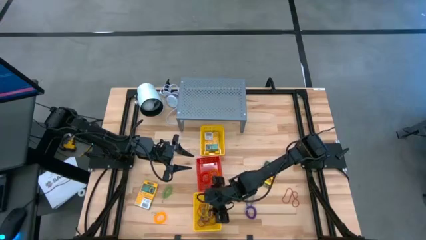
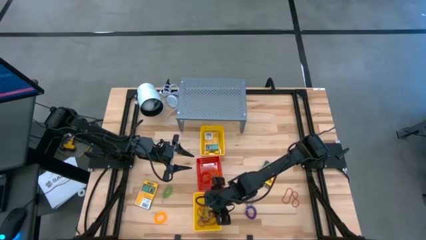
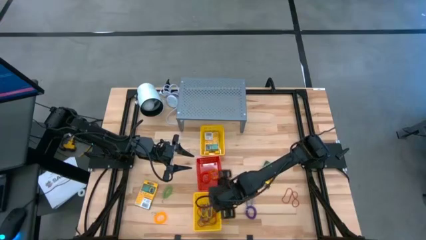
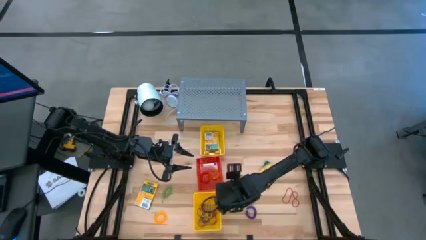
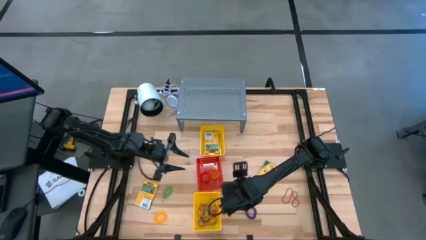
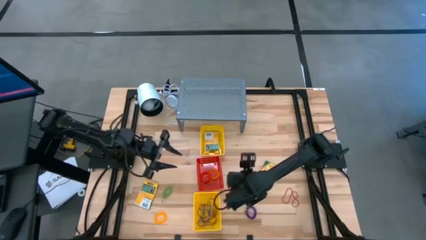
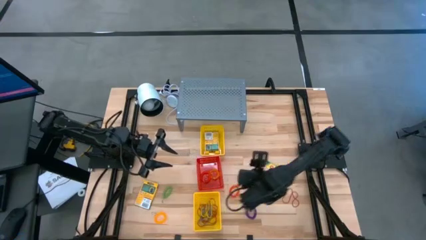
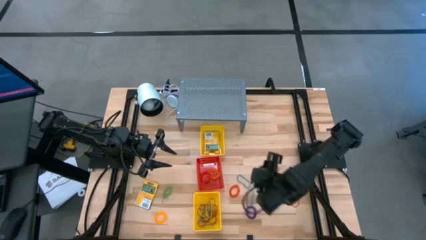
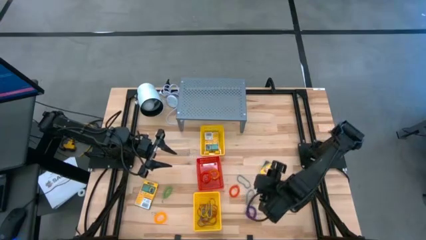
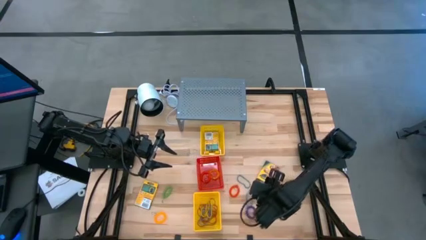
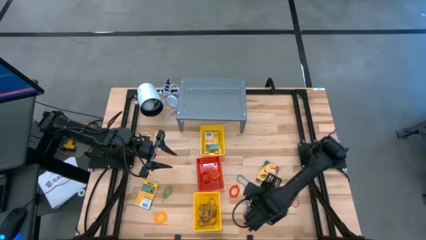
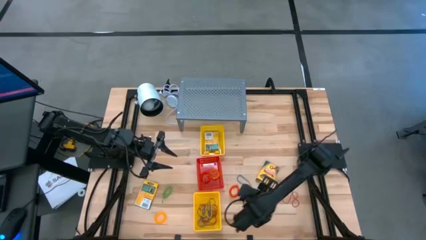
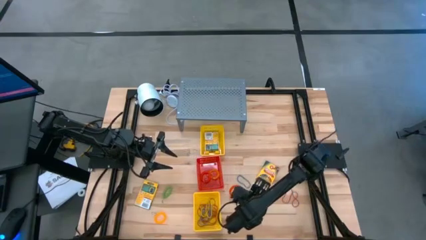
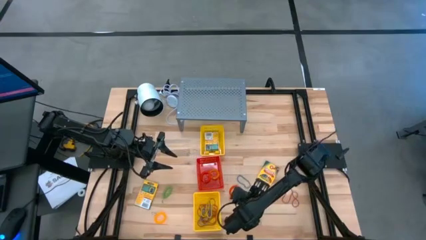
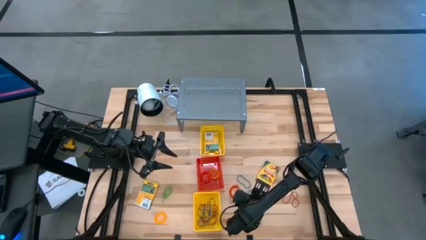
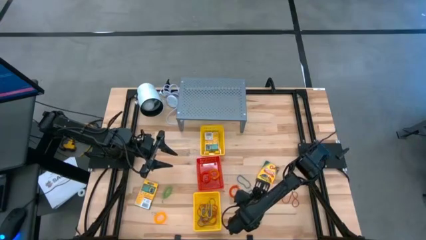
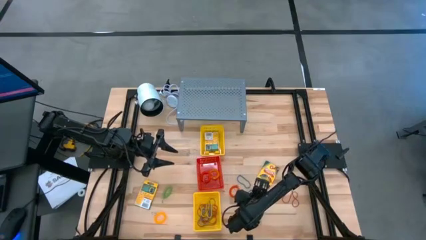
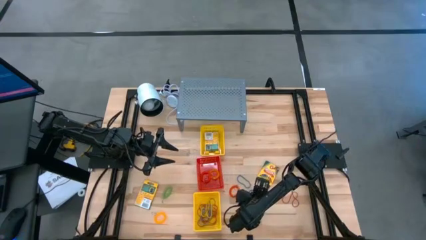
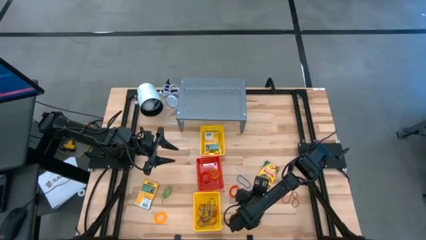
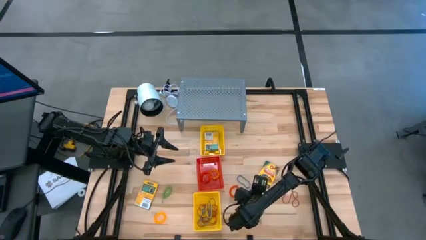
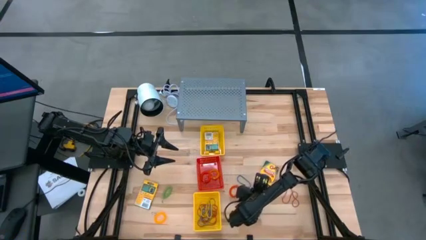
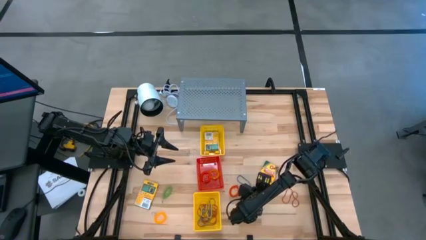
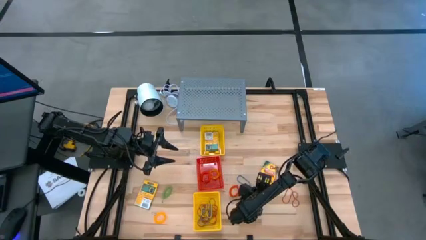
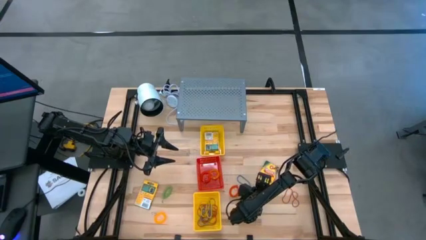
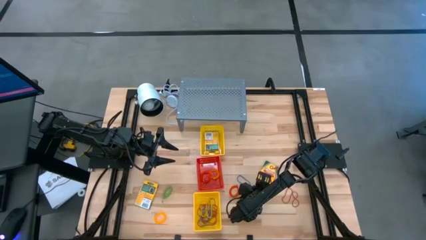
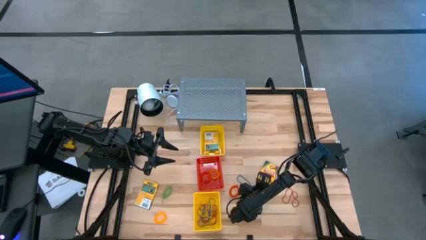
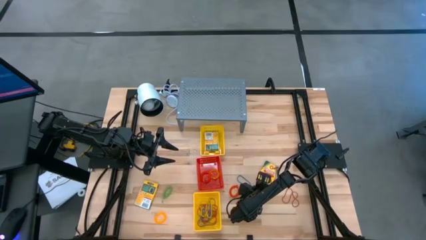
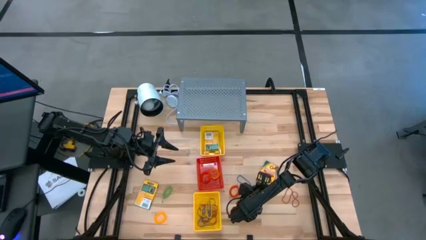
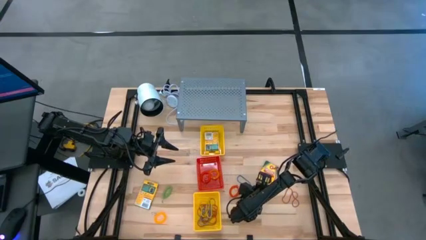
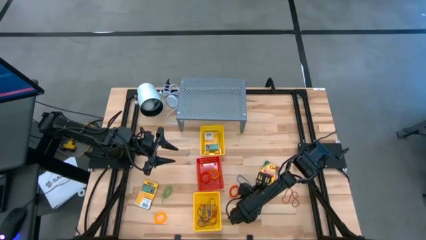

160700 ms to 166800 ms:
Task: Pick & Place Office Desk Supplies
Put the crayon into the top yellow bin

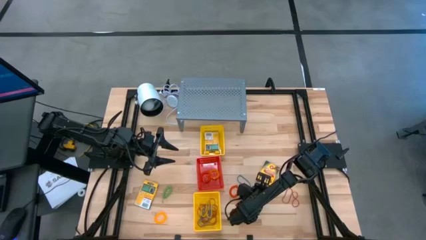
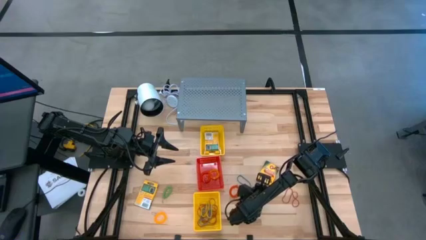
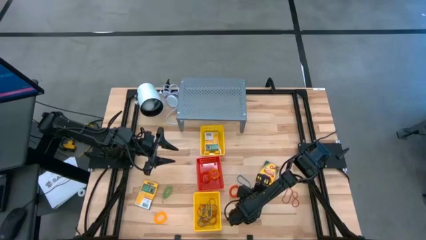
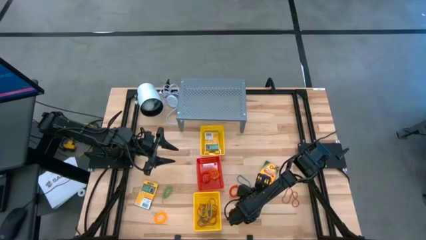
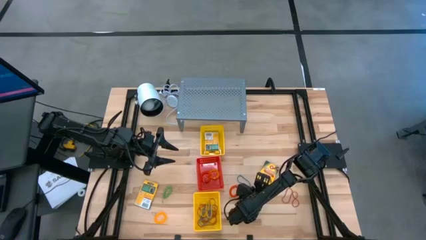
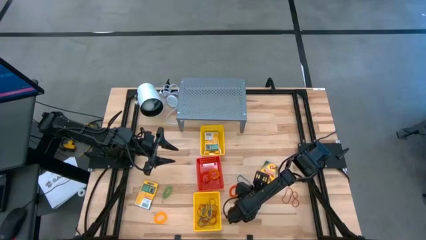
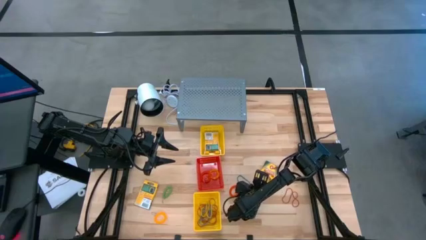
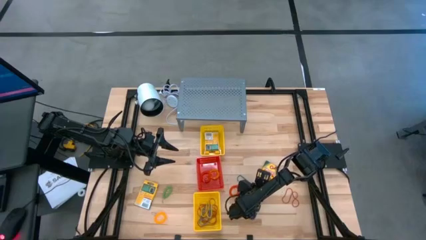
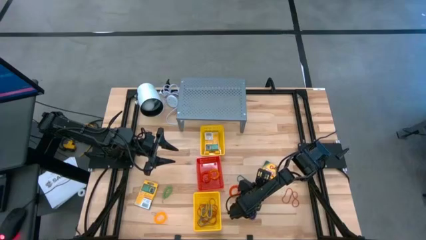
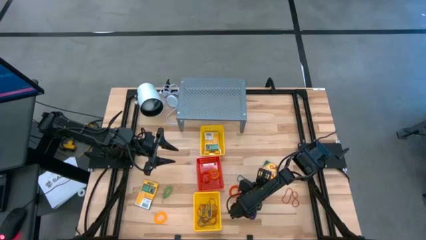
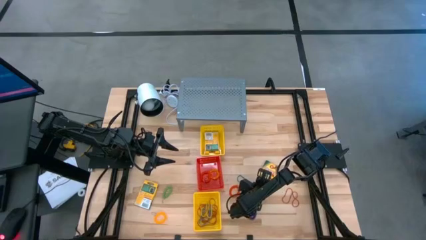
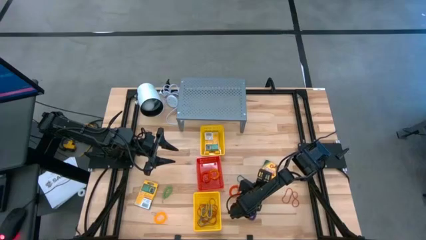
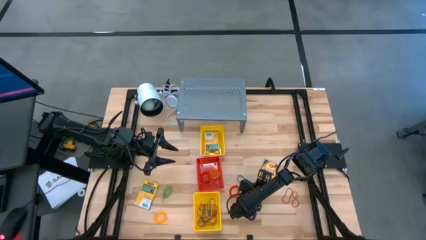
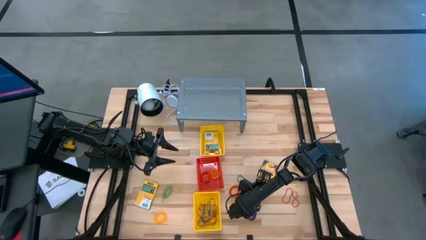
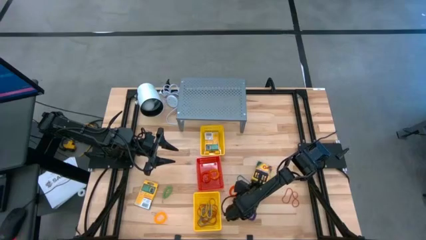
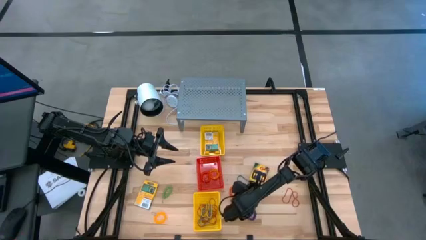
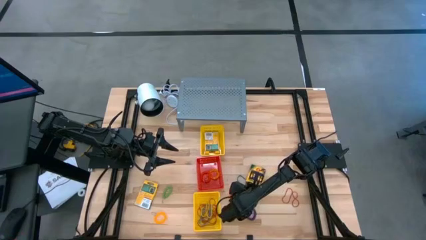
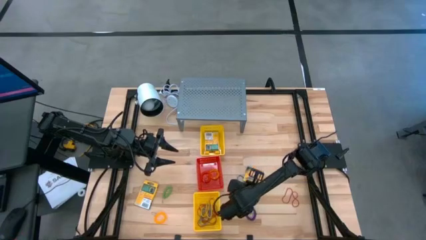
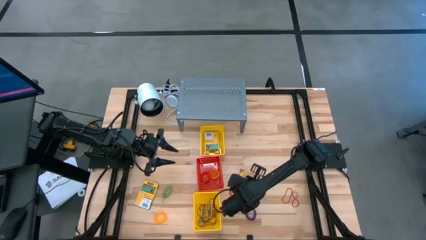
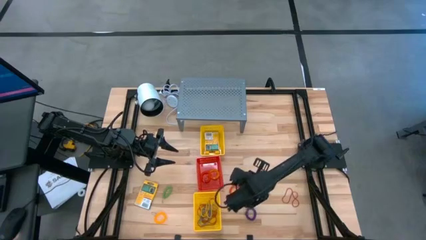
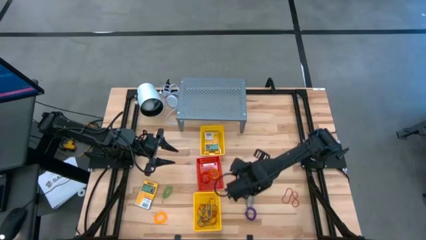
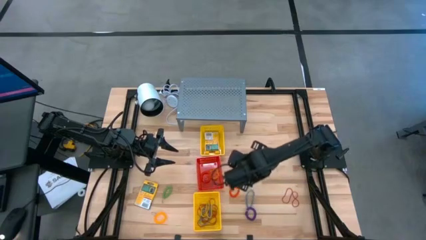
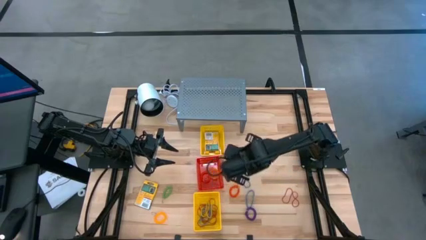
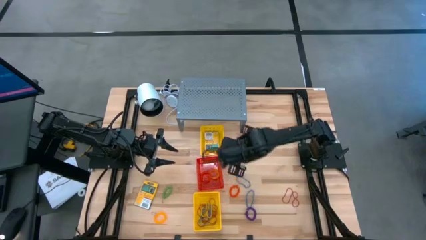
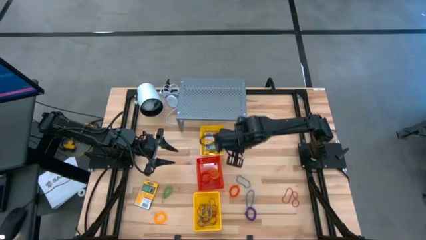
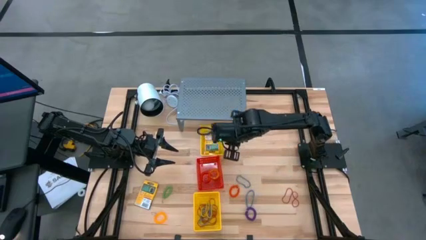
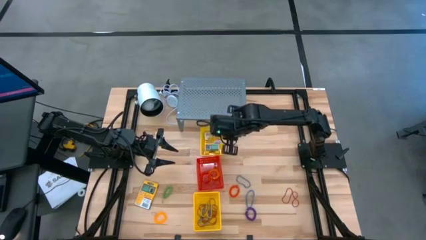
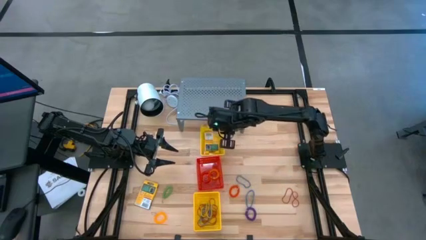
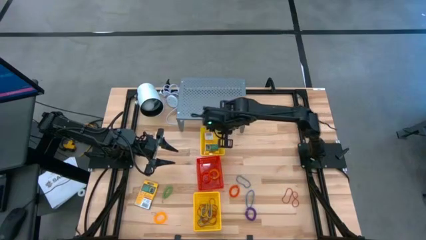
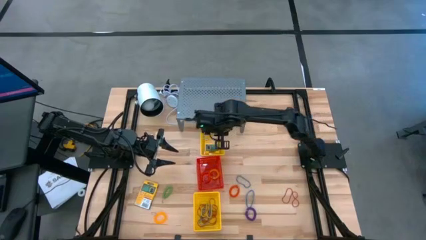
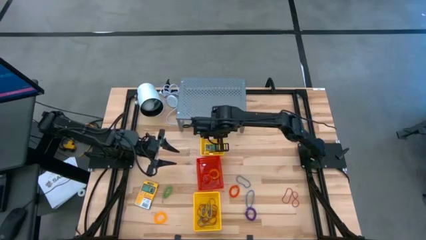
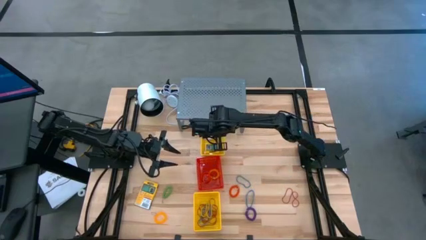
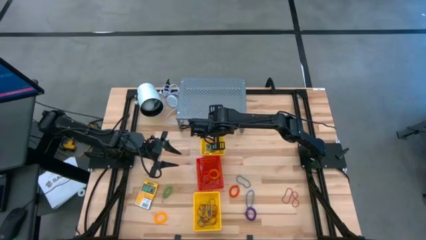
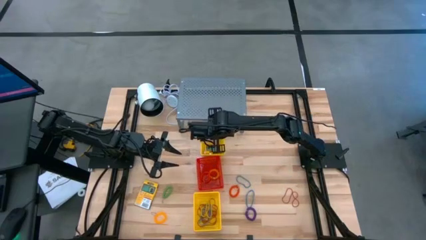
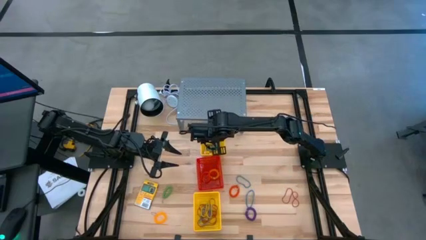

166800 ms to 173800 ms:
Put the crayon into the top yellow bin

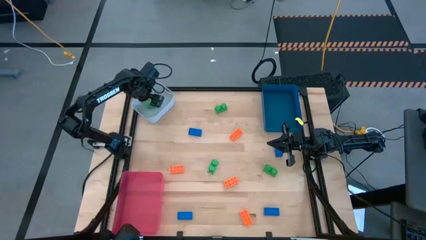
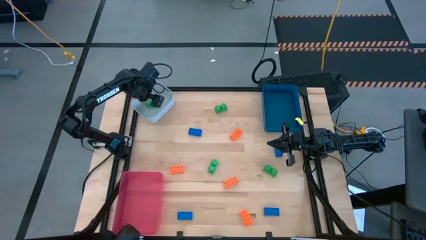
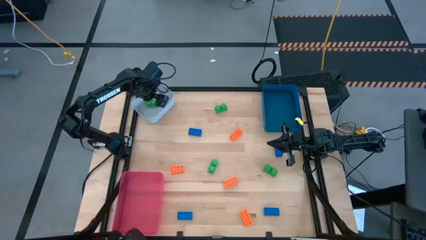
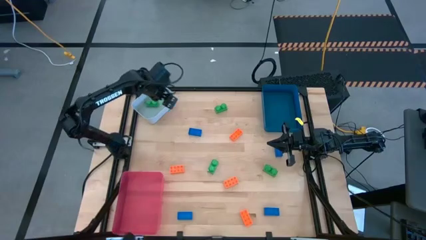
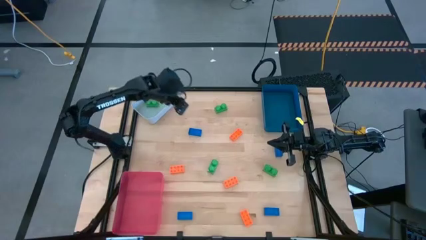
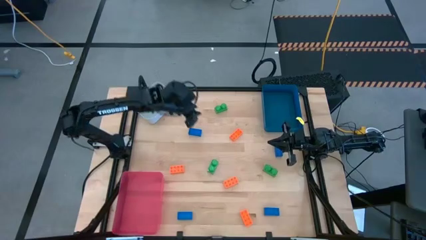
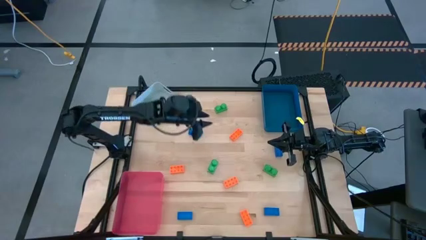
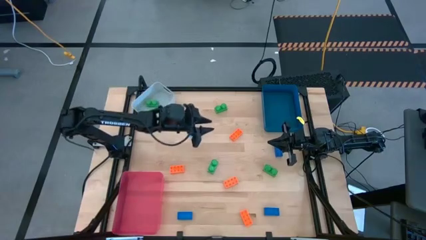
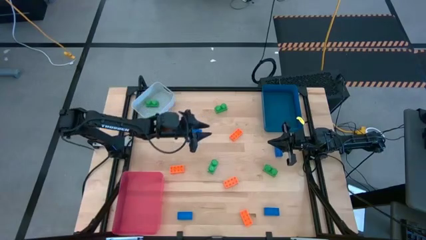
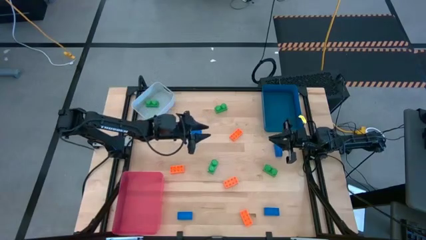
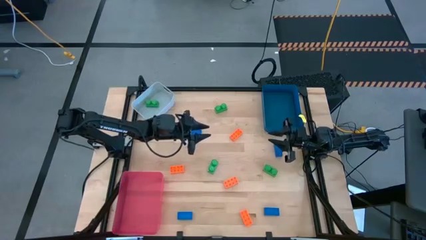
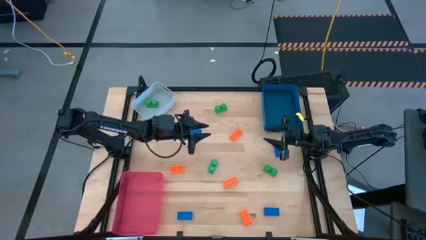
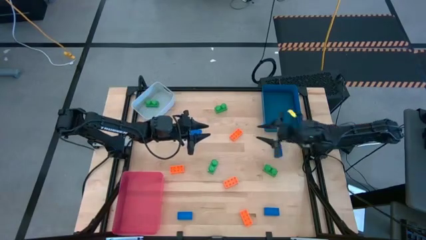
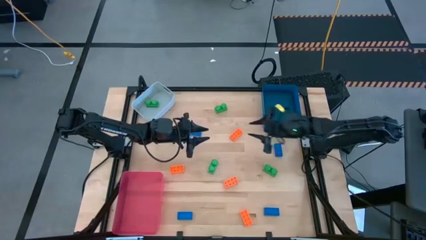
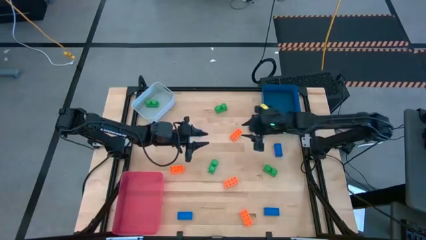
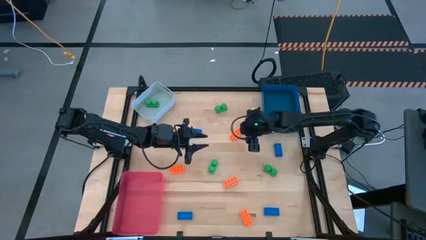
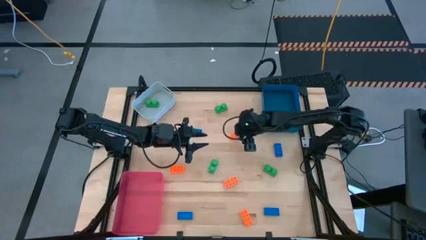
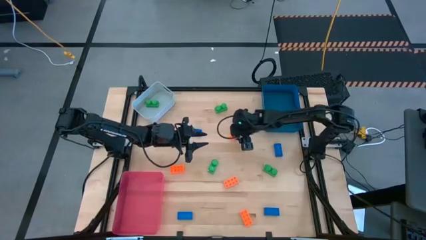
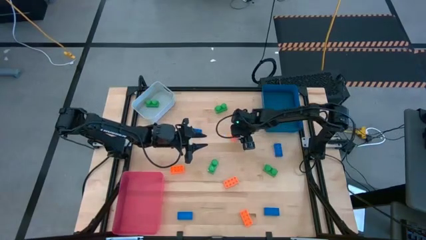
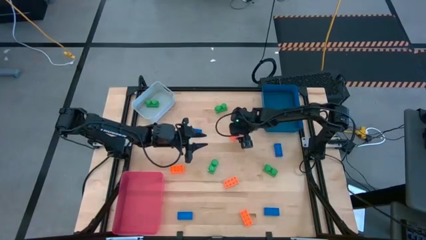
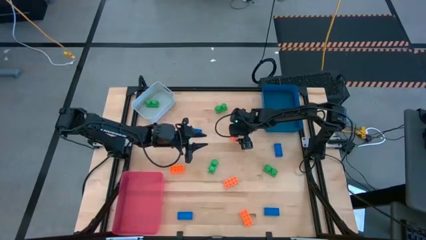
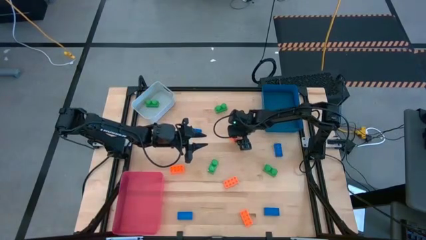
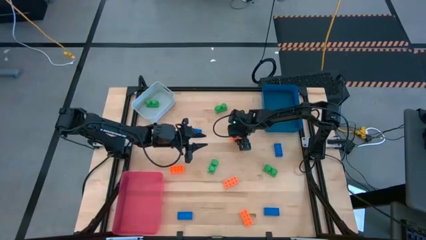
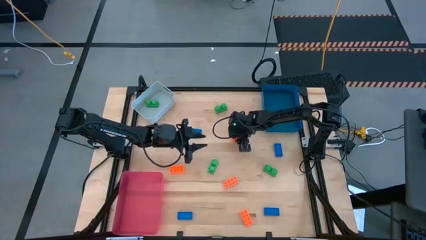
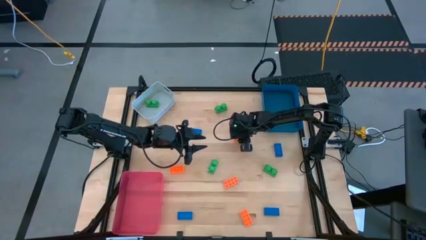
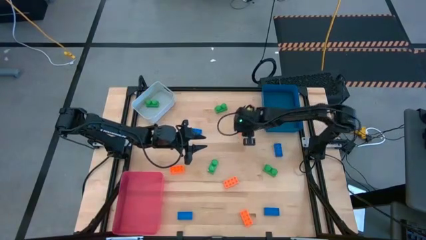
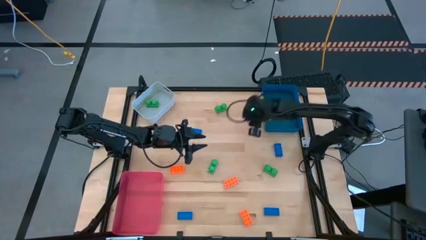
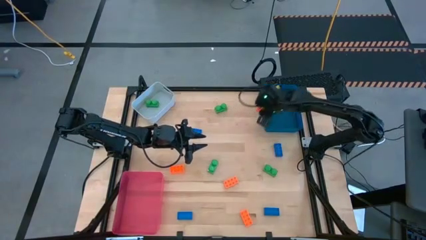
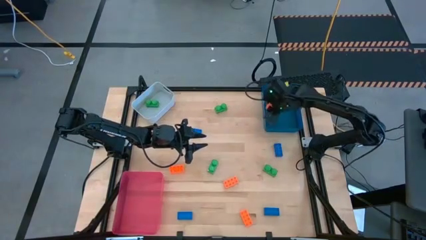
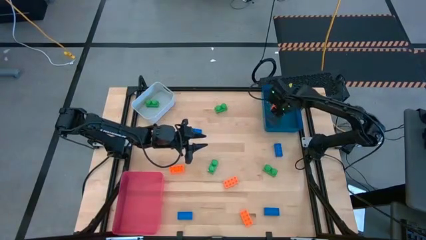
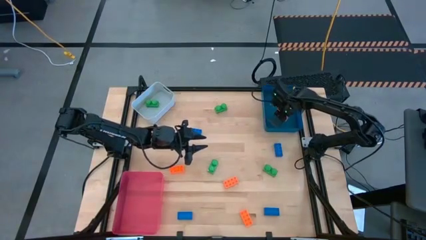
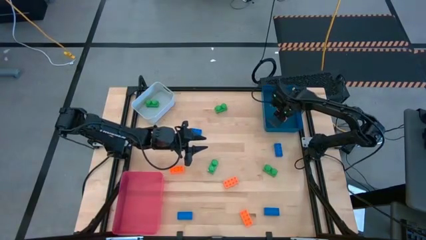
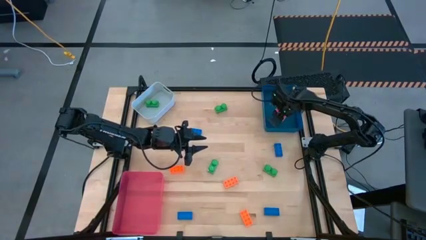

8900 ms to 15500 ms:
Task: Sort & place blocks by color
Put the orange game piece into the blue bin
